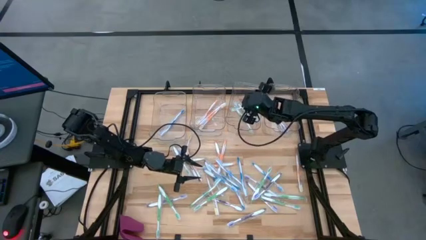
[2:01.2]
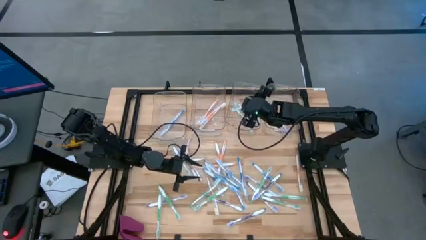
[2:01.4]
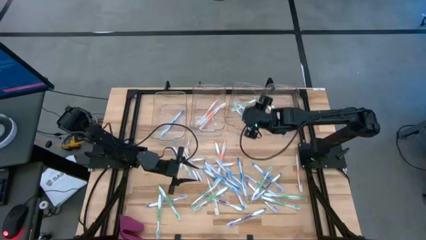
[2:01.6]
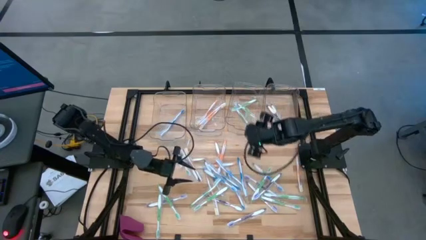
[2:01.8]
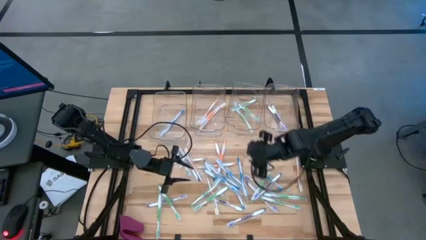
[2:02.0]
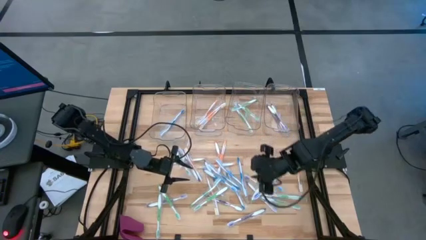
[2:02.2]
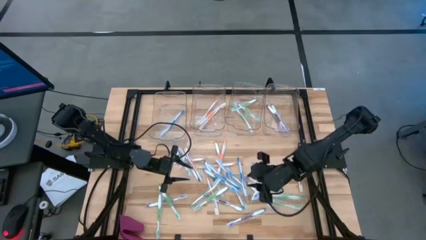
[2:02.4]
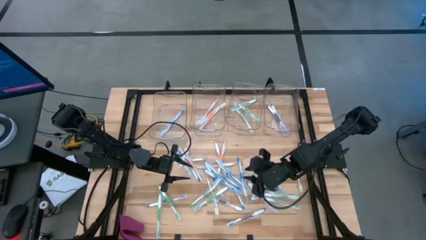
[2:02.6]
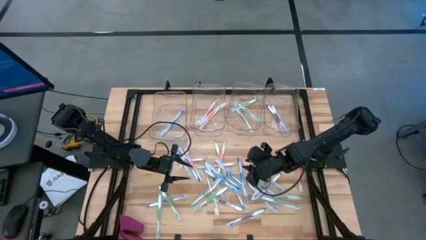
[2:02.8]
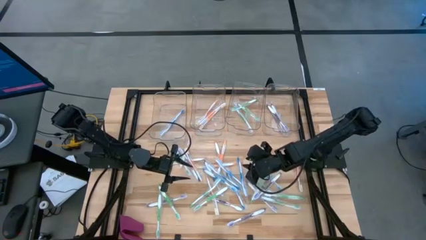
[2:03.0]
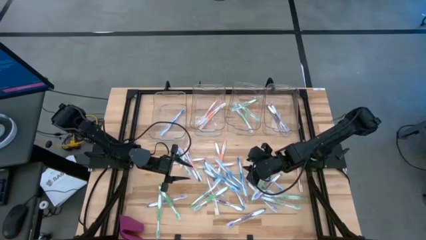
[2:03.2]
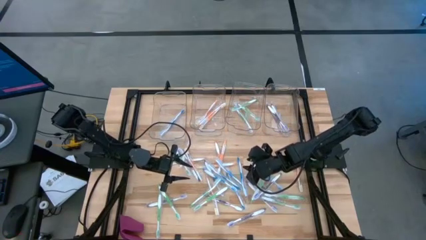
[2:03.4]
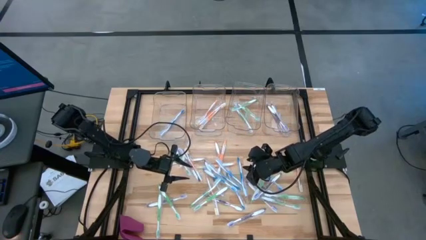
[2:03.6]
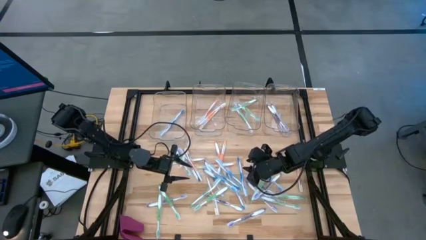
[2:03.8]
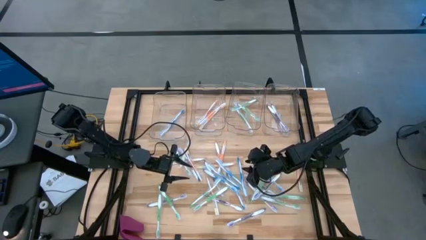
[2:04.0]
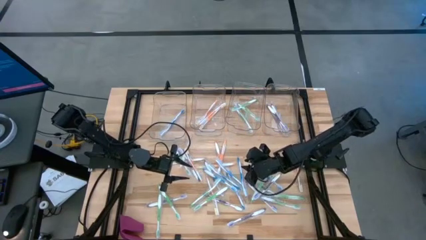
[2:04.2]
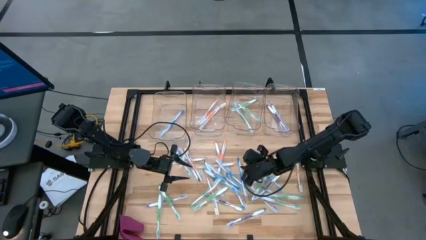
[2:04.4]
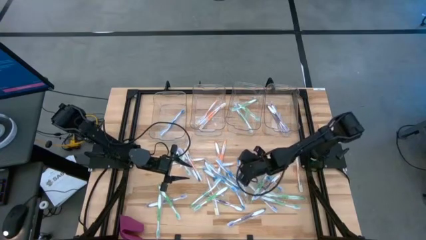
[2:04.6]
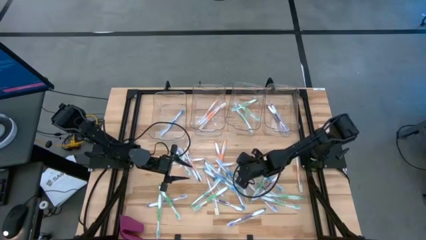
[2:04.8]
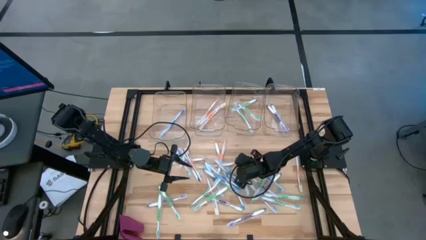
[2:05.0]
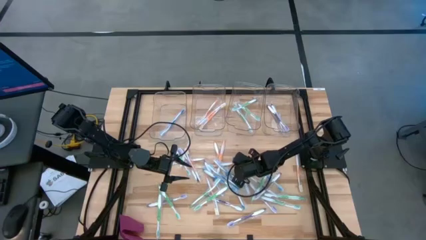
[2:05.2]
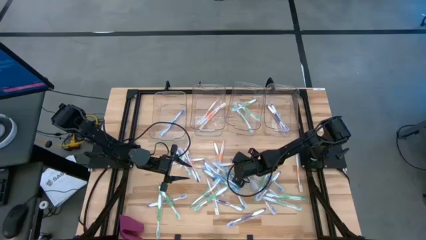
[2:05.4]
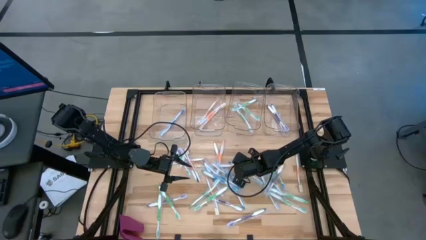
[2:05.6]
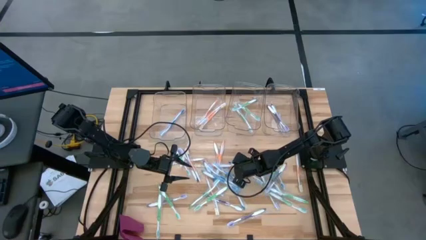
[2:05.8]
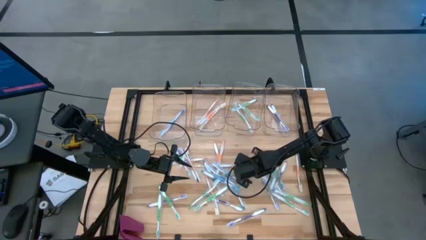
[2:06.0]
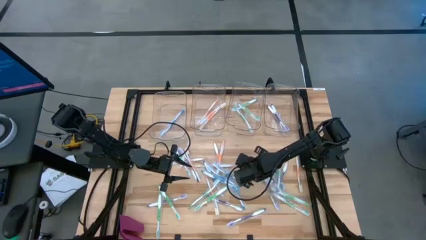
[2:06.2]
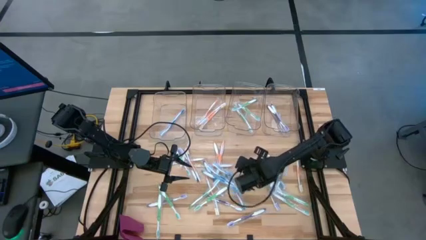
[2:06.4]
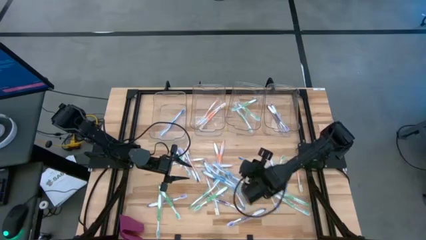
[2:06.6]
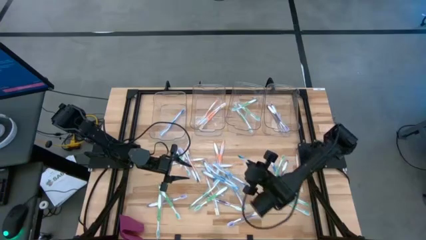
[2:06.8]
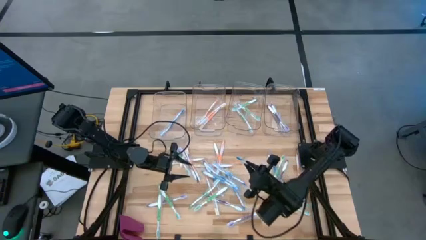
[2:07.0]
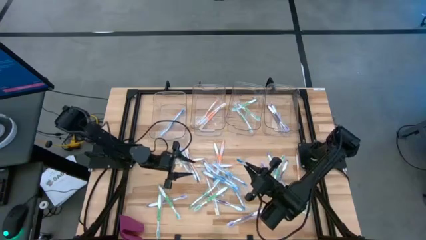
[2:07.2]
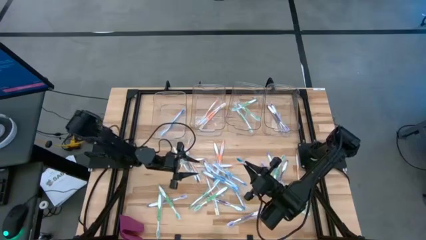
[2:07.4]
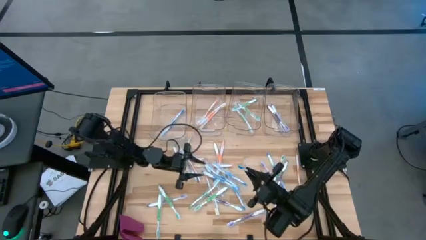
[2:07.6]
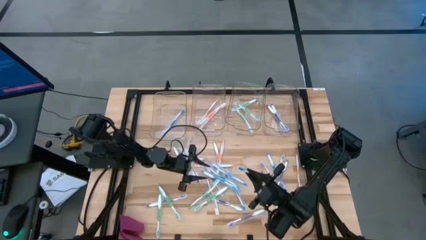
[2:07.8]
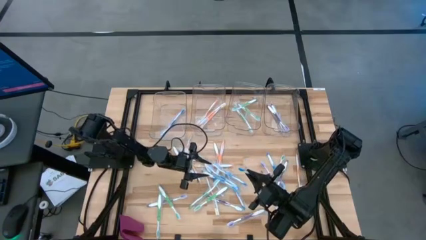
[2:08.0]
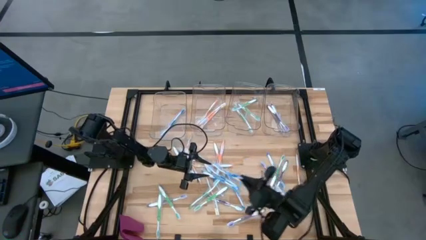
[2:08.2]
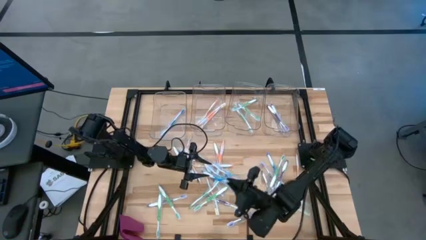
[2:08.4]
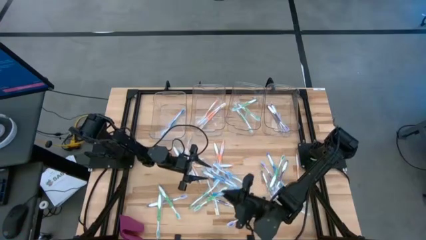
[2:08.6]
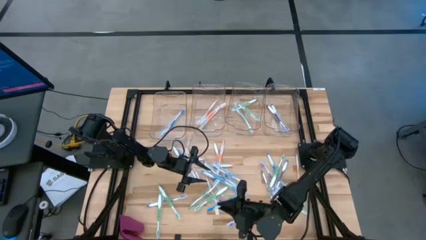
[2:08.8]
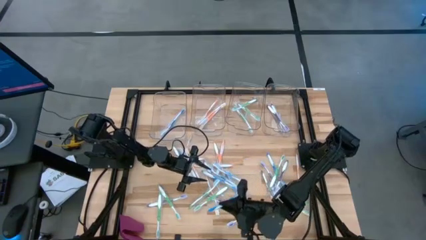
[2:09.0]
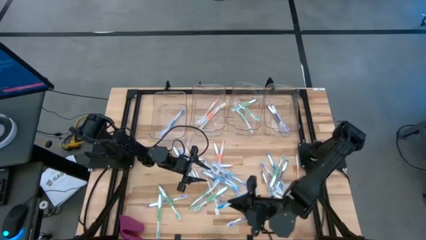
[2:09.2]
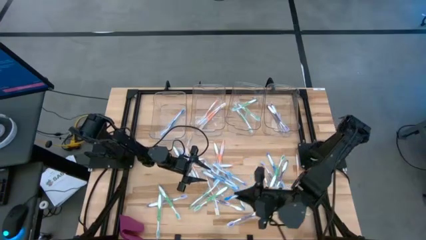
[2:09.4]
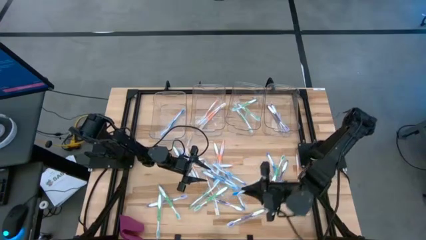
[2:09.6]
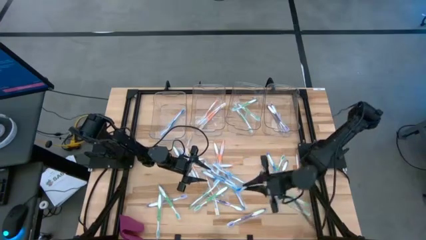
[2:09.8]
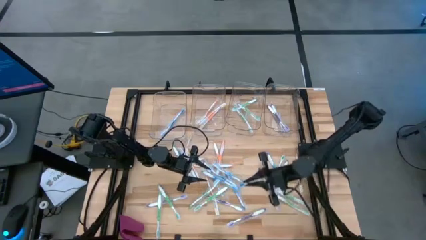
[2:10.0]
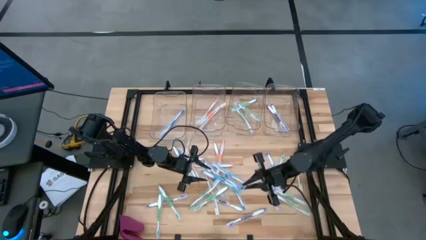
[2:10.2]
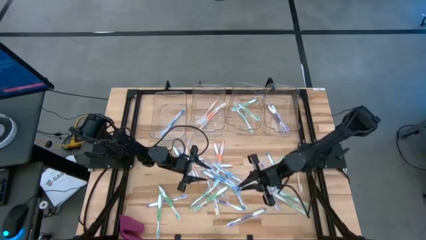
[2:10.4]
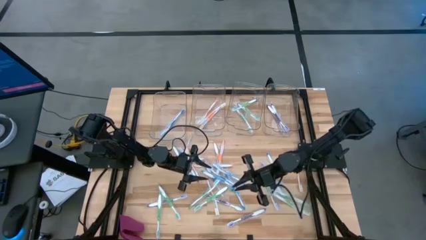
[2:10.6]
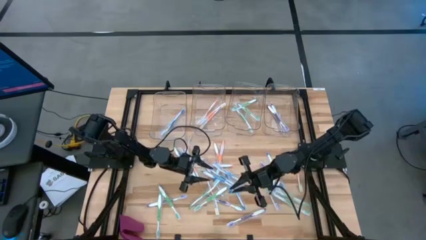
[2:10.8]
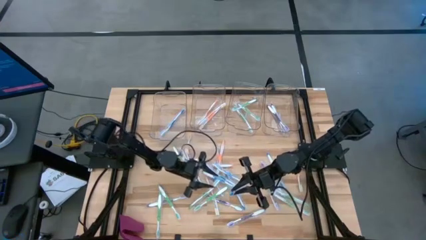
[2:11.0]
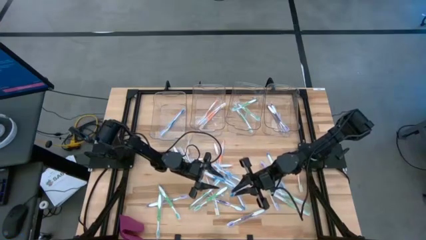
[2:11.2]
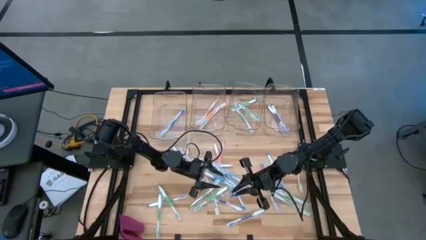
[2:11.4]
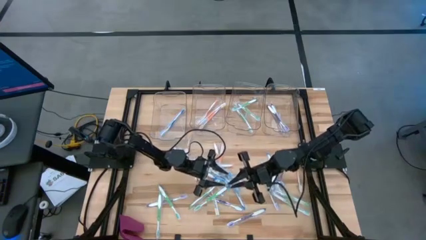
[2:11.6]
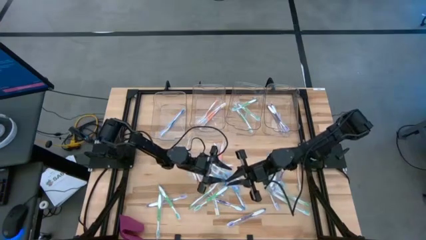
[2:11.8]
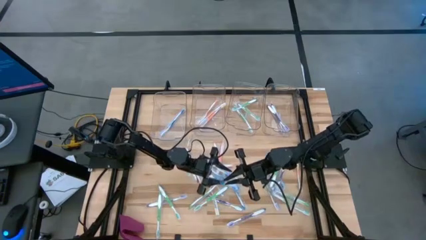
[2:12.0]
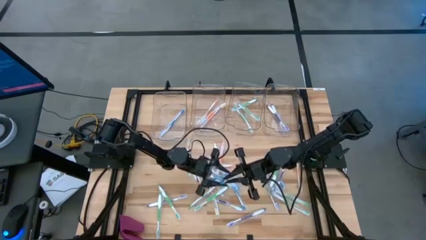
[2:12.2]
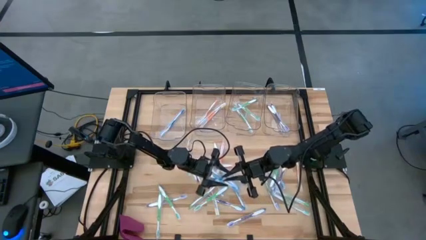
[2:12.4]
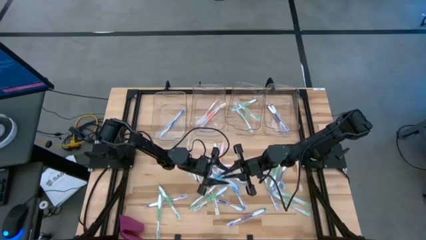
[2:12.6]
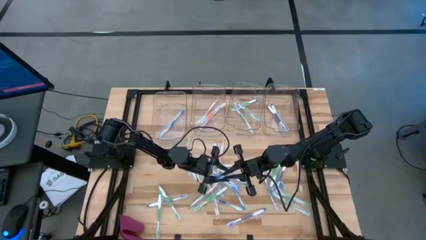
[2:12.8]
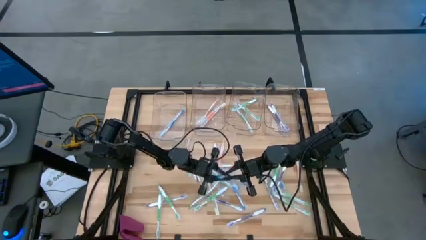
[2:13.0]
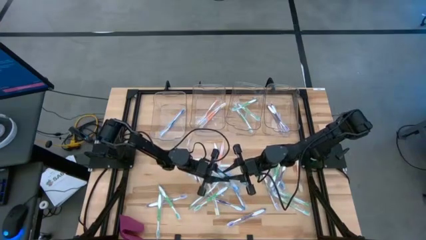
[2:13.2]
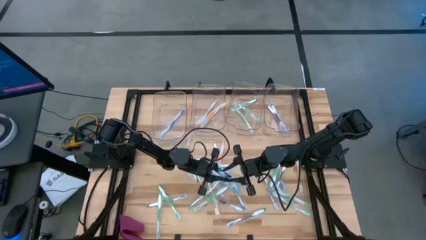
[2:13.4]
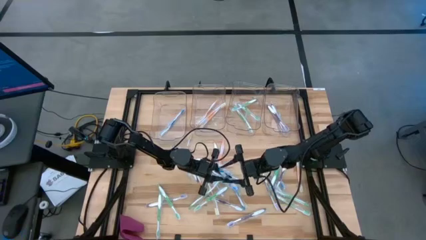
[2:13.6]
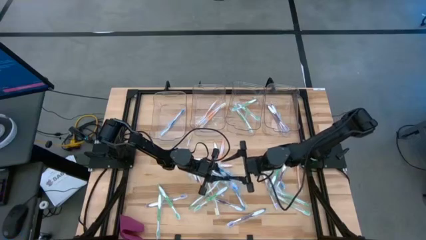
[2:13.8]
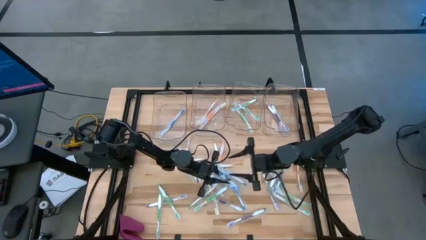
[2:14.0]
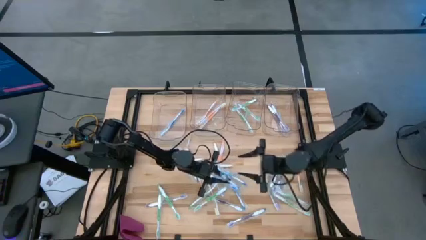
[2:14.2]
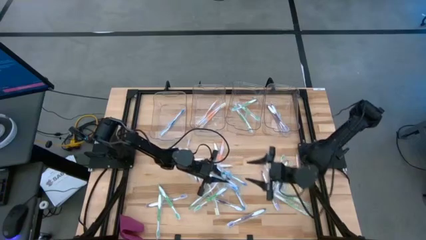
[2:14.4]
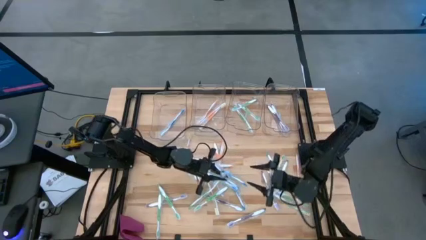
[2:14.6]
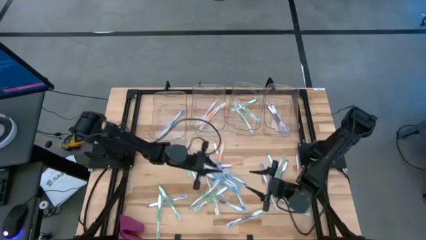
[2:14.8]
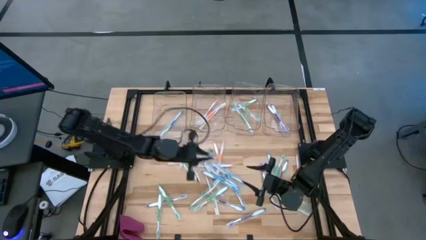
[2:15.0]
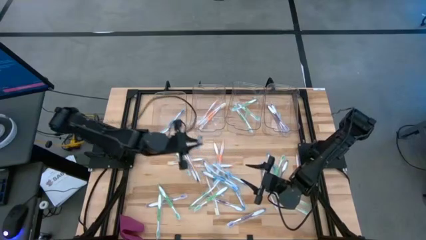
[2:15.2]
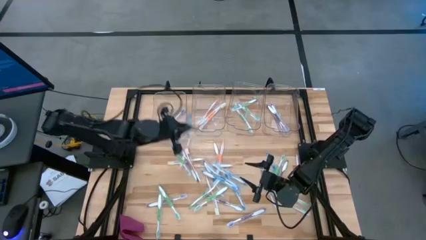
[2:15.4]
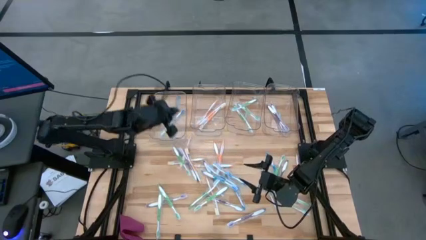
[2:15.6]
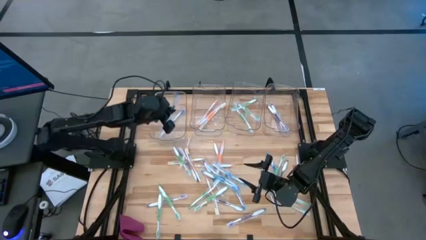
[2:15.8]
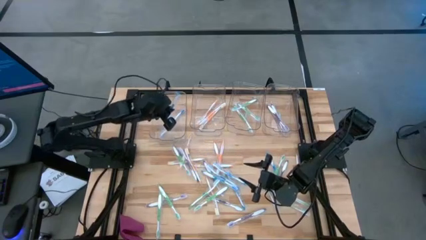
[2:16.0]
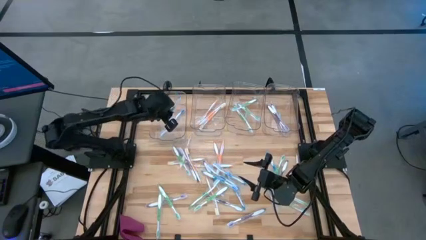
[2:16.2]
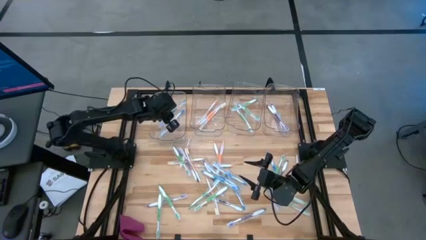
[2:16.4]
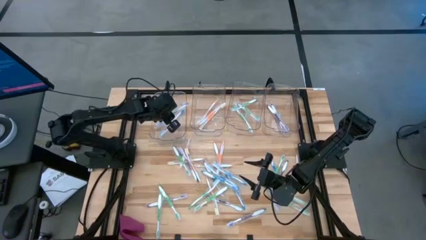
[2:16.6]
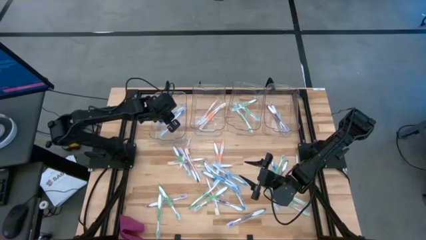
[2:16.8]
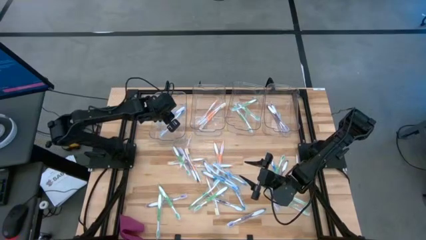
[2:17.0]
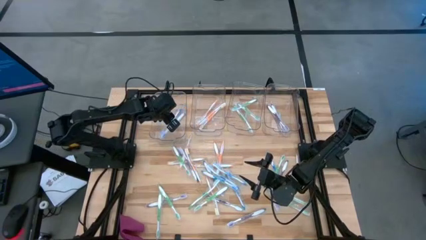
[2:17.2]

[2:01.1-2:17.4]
Task: Pick & Place Toothbrushes
Put the blue toothbrush into the left transparent bin
